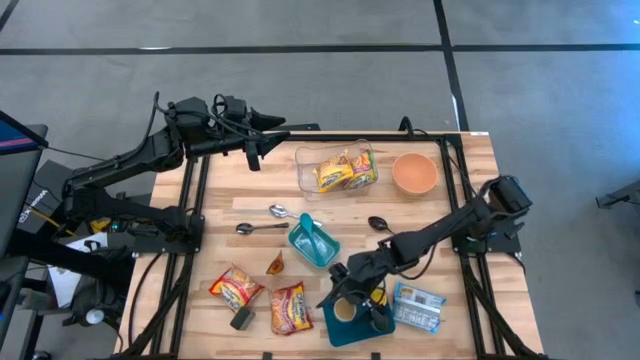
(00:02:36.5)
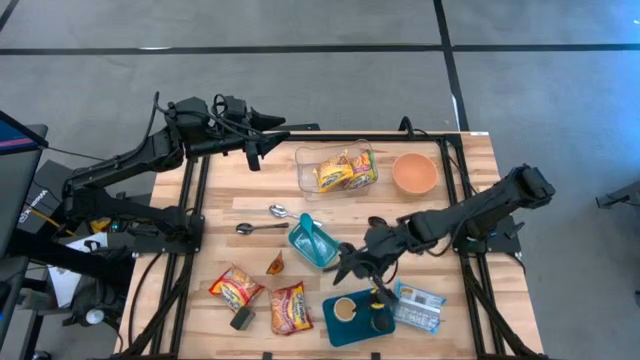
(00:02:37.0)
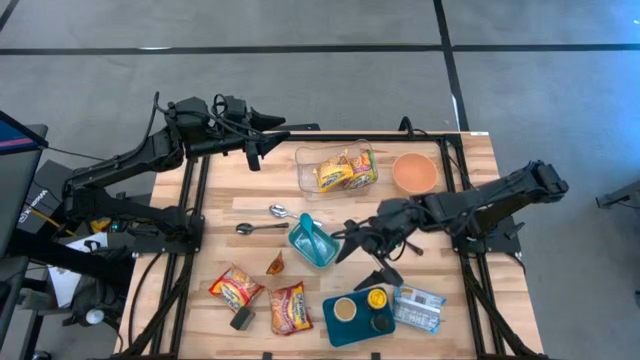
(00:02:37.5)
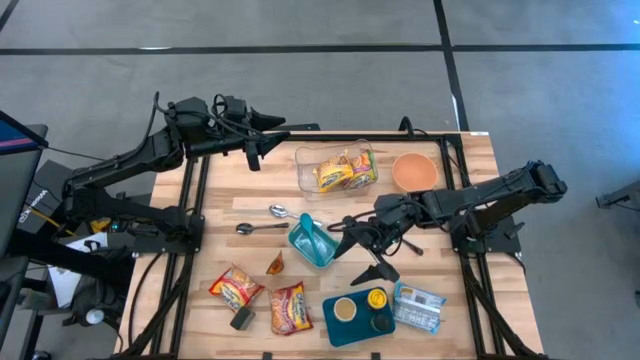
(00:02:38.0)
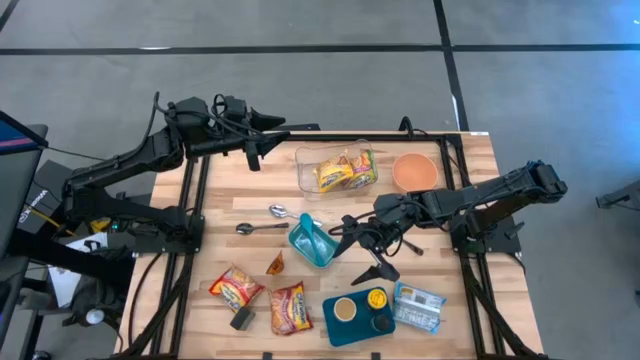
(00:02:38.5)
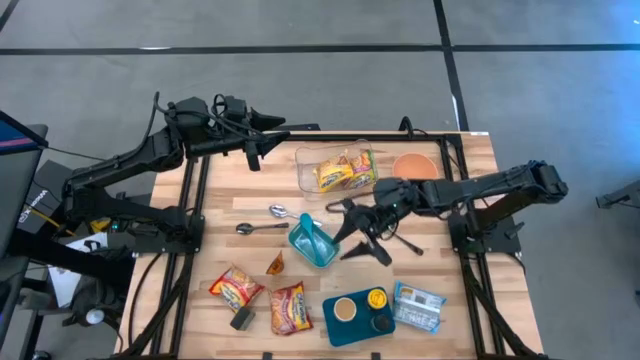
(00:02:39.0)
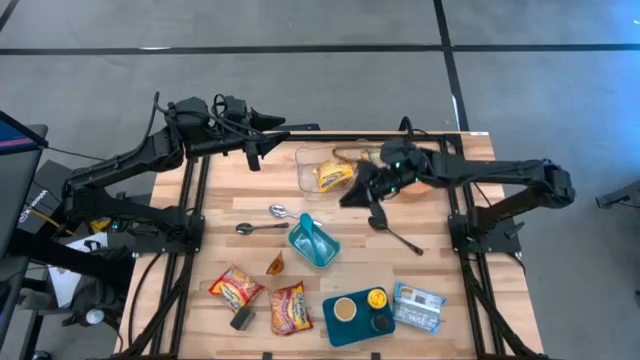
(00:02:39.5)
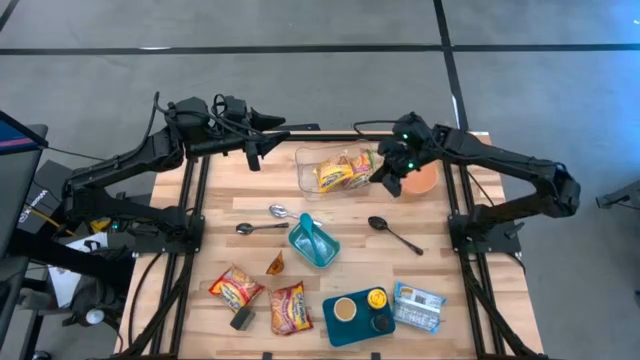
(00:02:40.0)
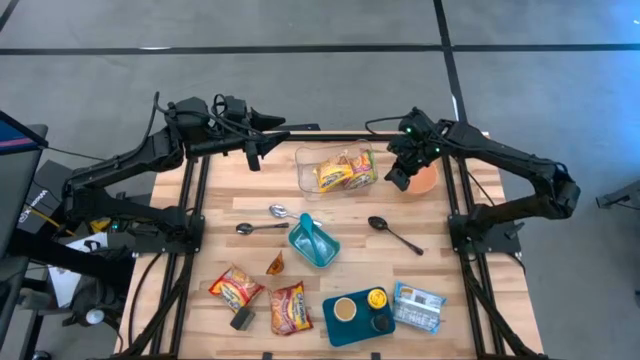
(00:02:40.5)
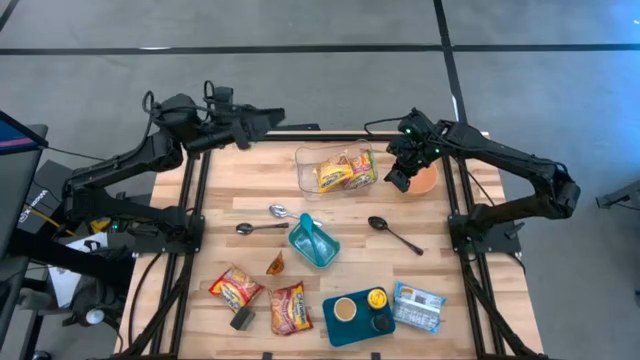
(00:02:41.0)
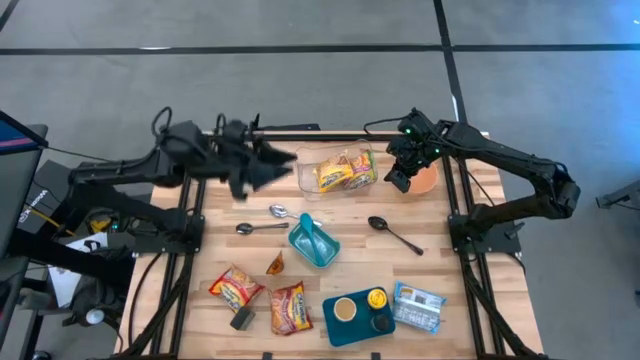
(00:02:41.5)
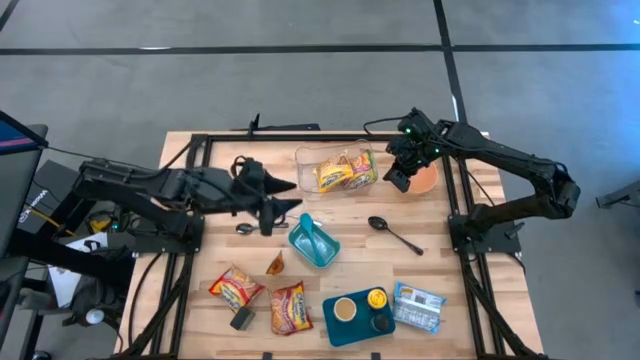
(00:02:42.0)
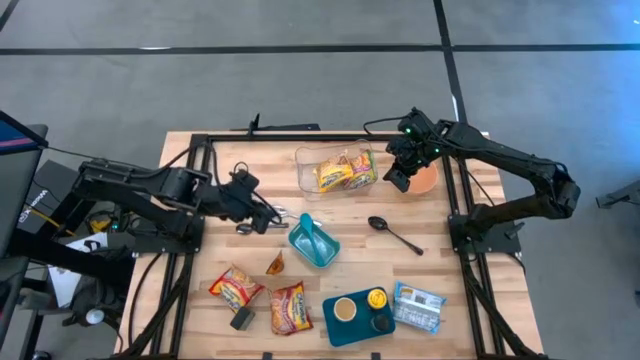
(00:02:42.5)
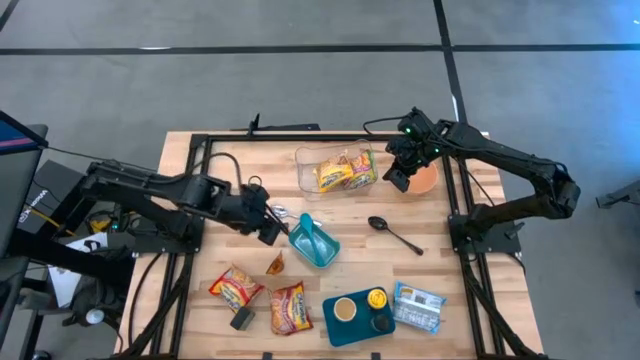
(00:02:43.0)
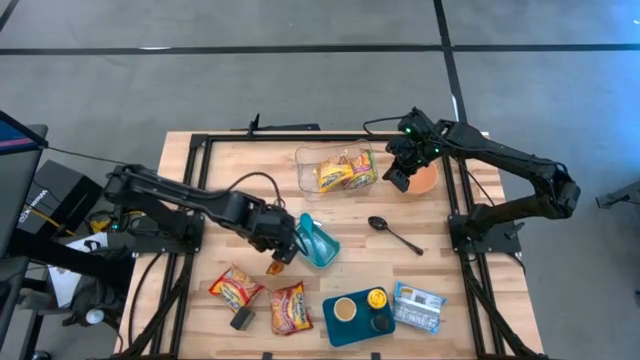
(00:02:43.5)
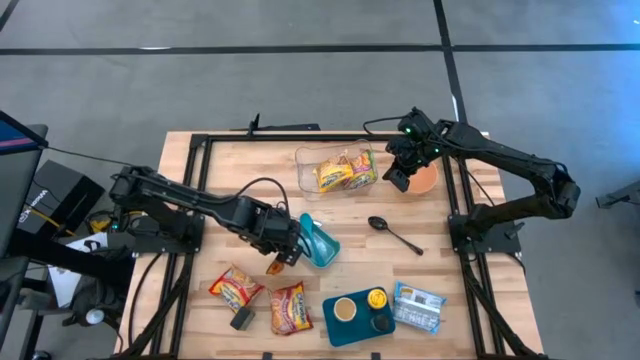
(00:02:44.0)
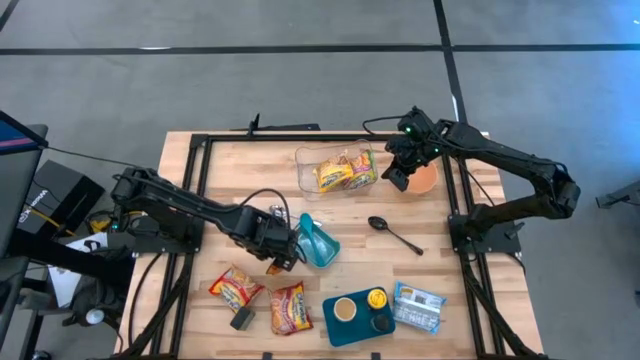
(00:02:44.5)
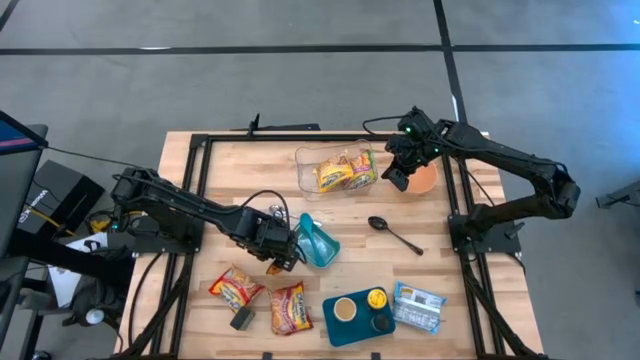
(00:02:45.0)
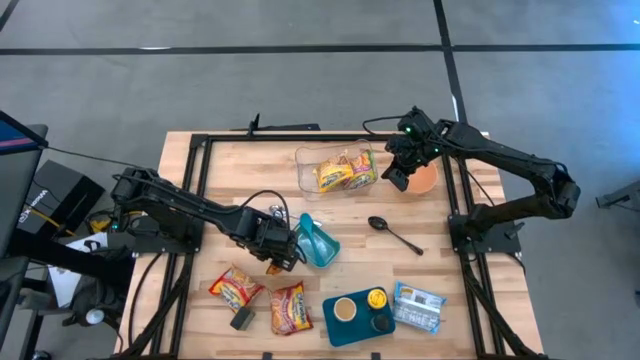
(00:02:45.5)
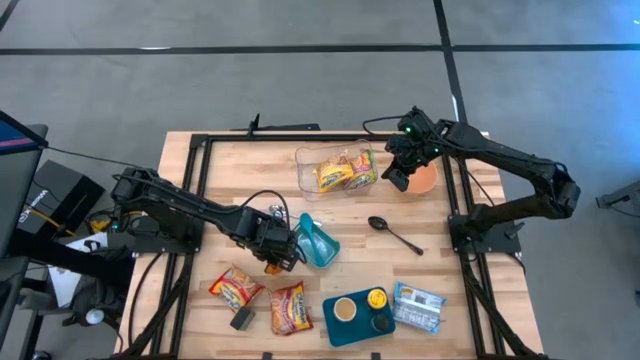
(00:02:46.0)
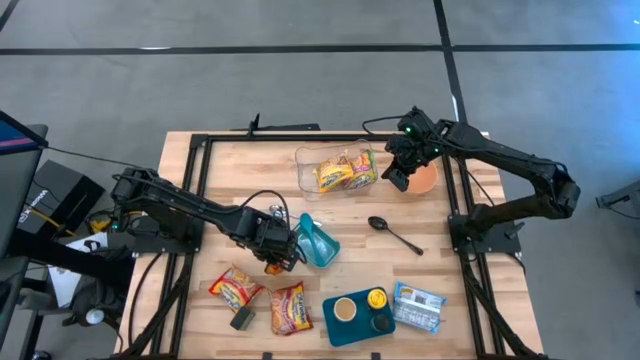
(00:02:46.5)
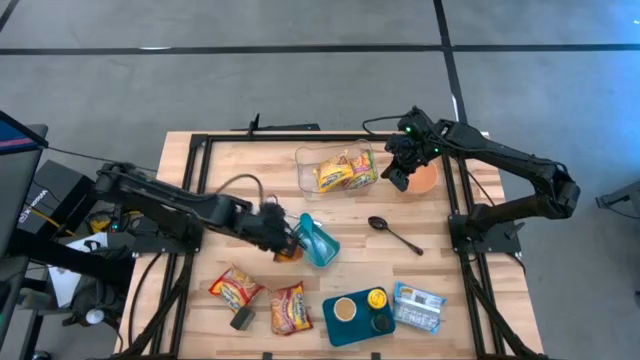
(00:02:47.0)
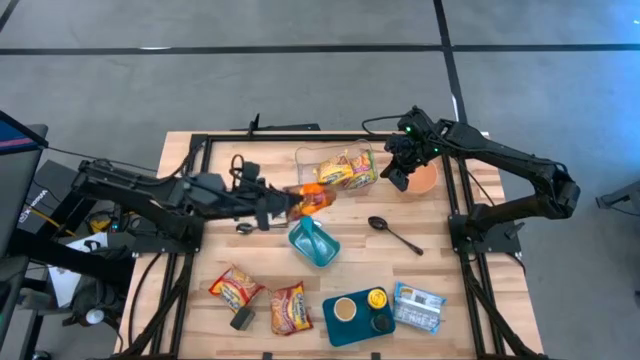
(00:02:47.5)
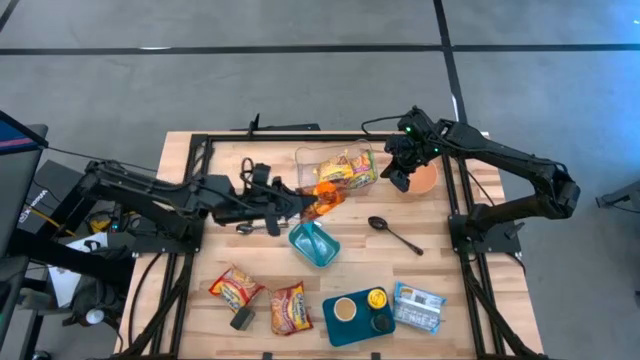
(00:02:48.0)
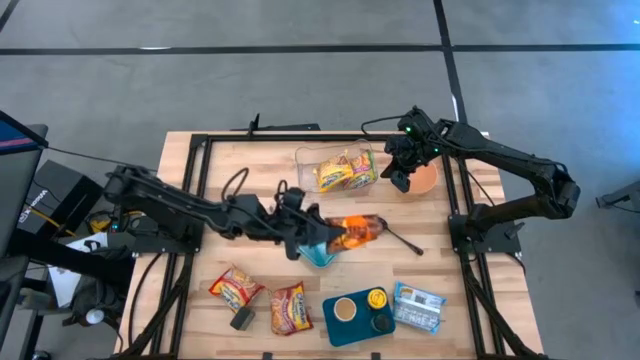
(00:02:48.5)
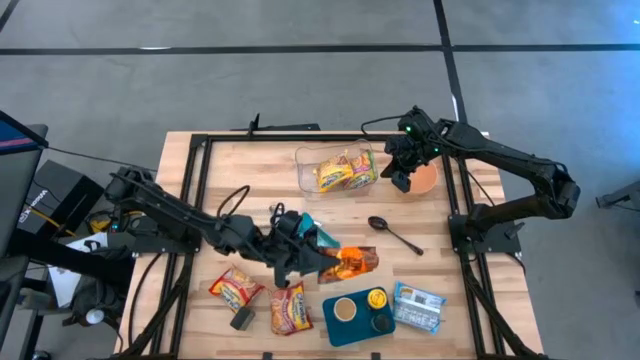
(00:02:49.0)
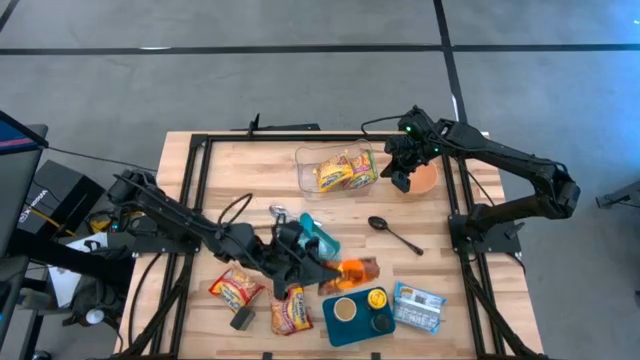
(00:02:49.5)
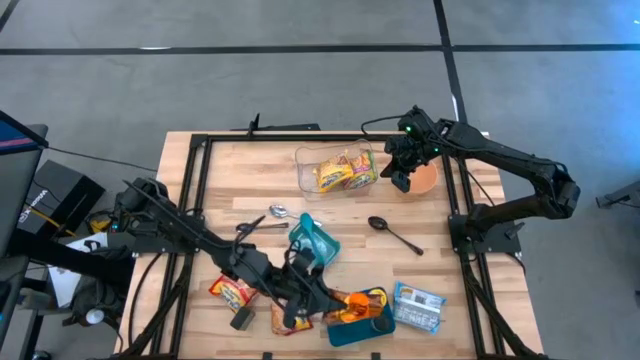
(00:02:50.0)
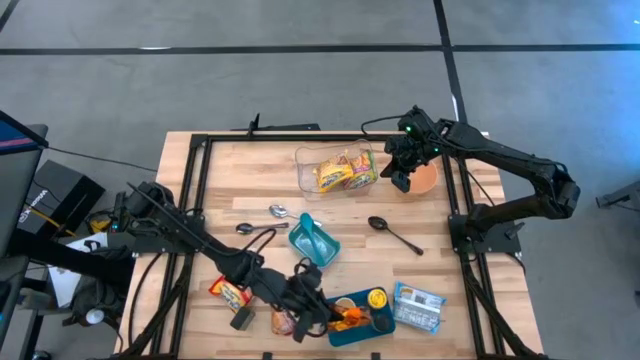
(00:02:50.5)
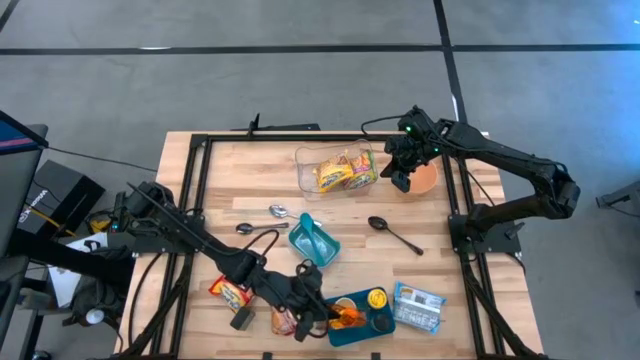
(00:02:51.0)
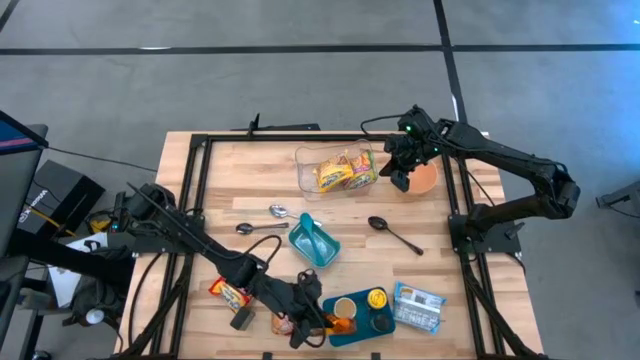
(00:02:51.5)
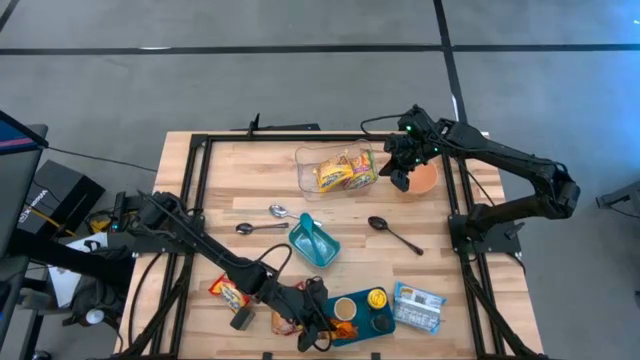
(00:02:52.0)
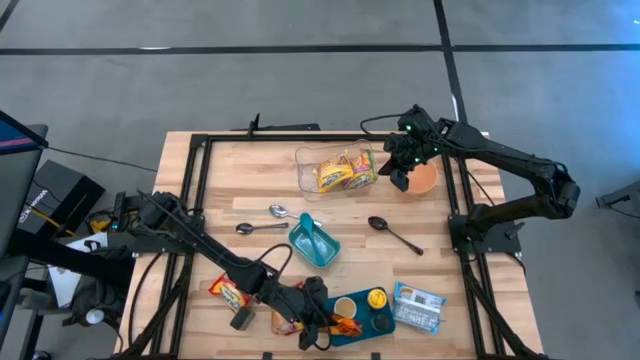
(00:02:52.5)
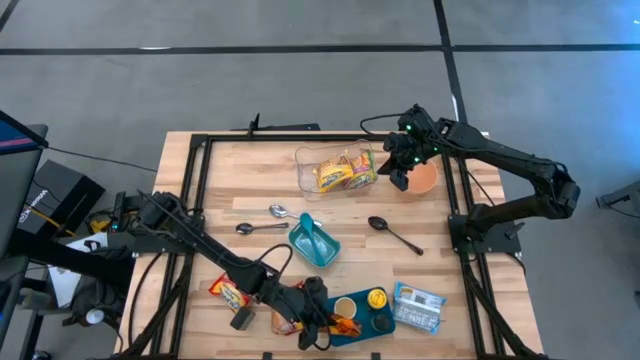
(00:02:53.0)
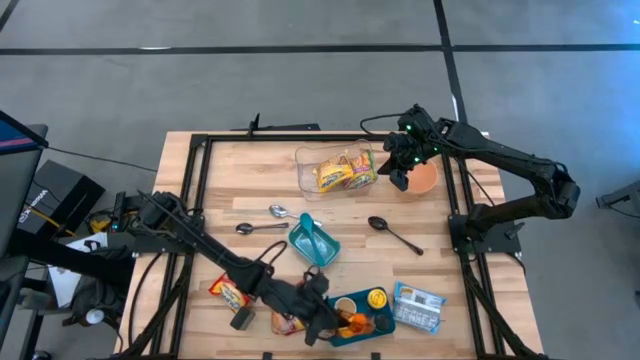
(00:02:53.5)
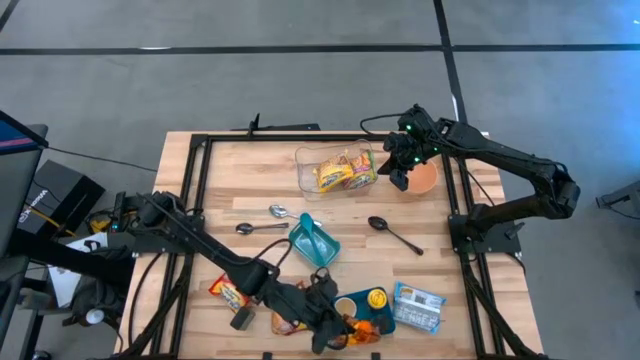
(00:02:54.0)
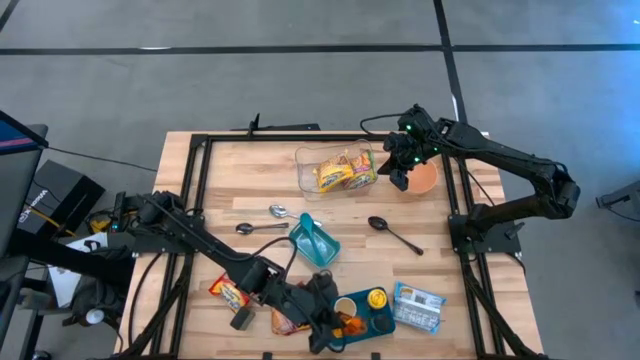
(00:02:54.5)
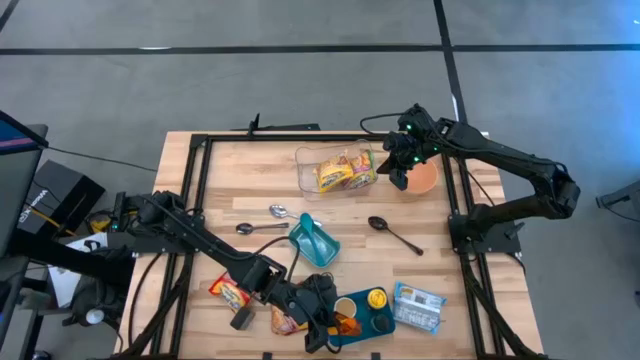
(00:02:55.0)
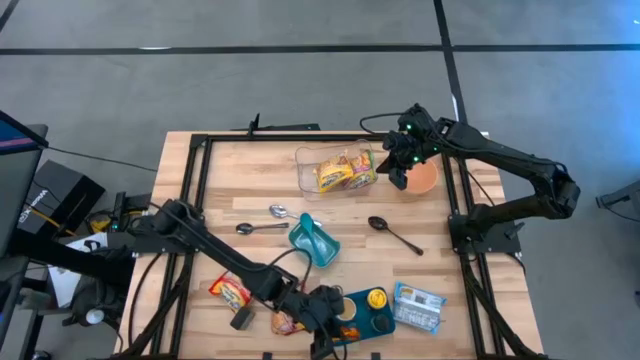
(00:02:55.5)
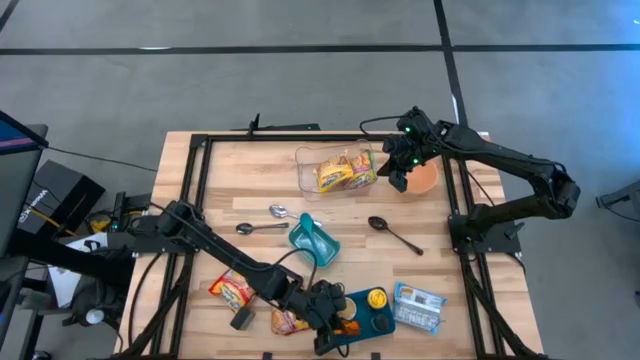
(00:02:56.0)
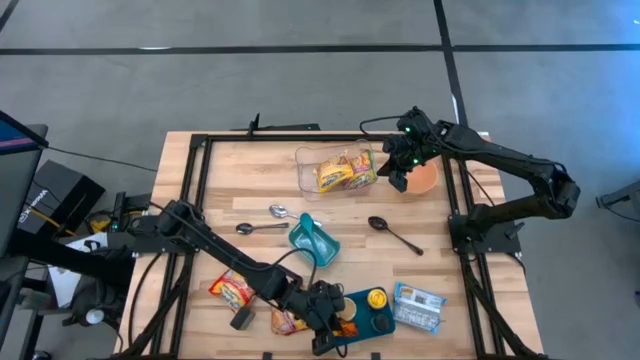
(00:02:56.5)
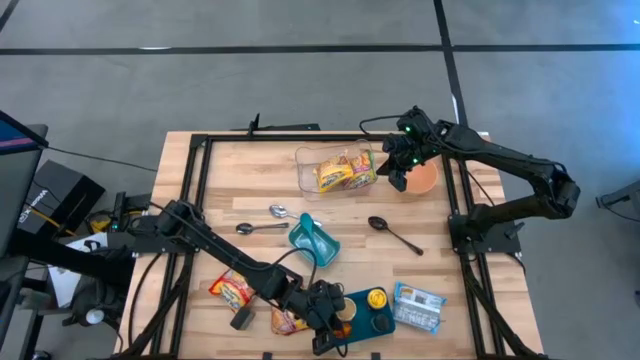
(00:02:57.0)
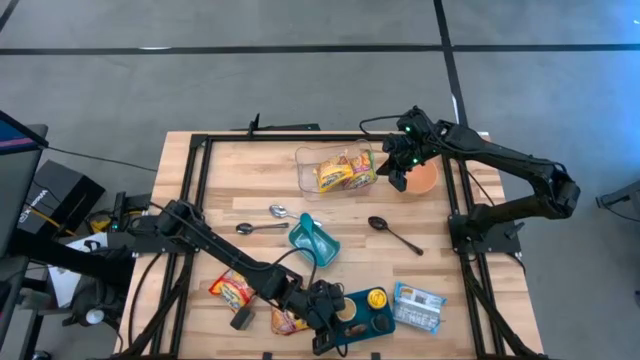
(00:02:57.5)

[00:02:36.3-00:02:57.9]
Task: Pick & Place Food Item
Put the orange seasoning pack into the blue bin
